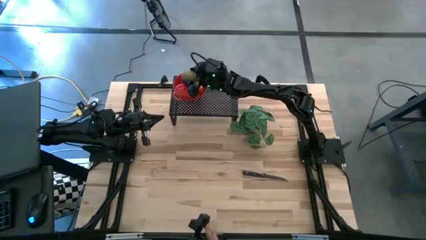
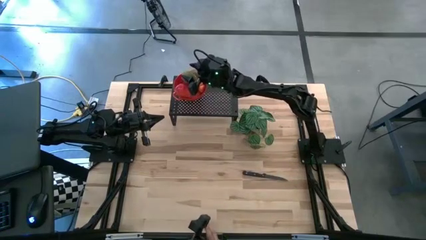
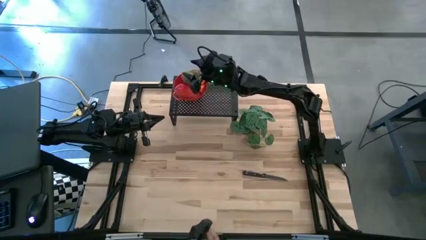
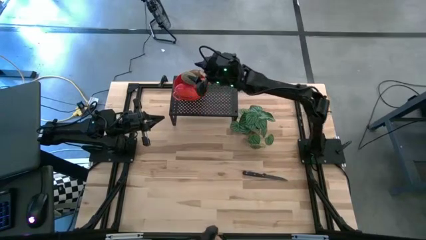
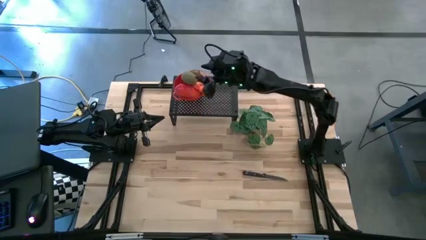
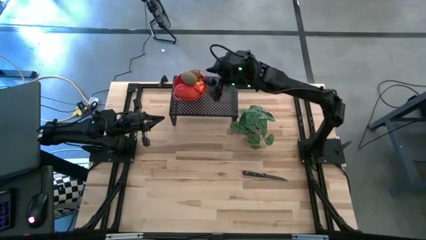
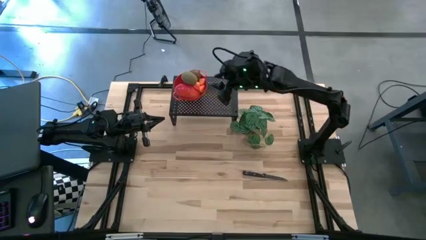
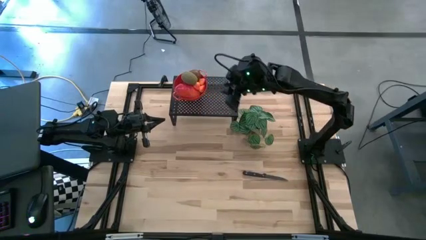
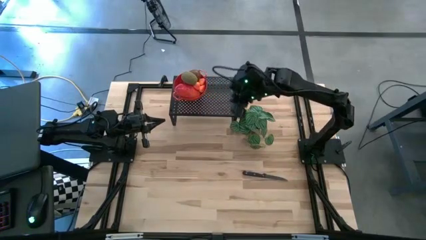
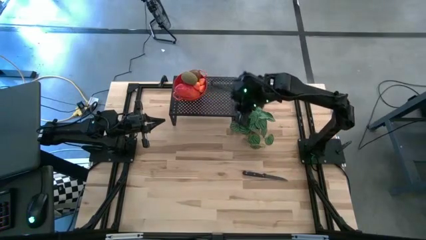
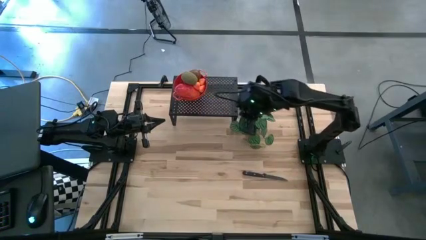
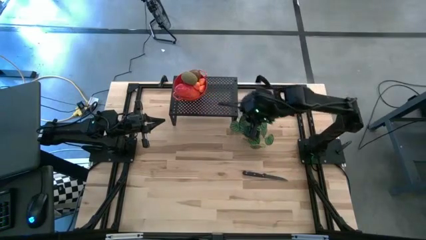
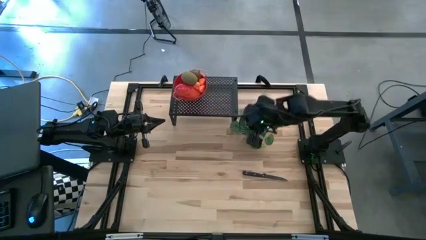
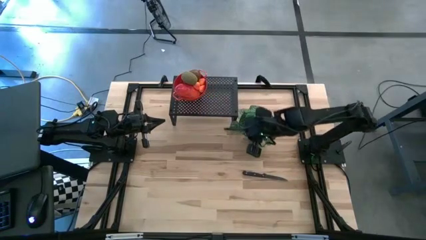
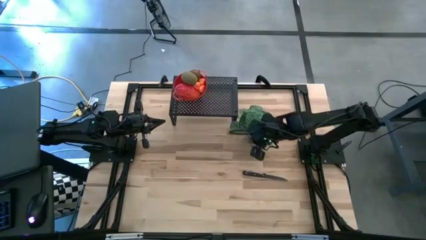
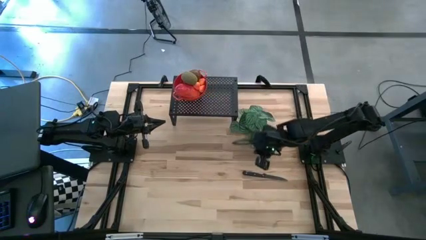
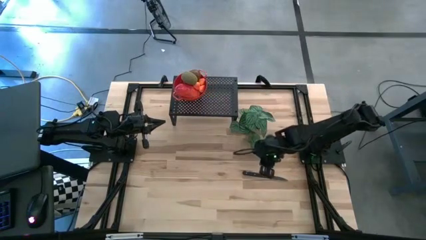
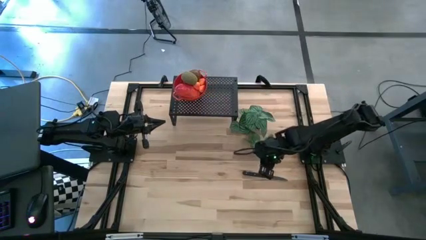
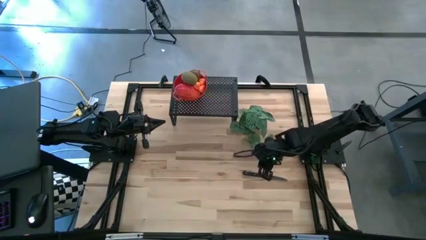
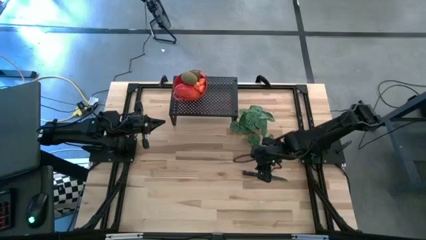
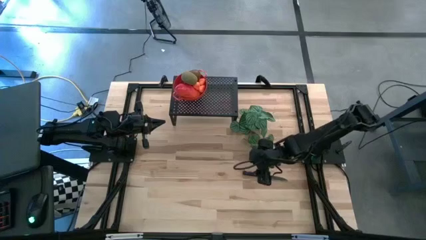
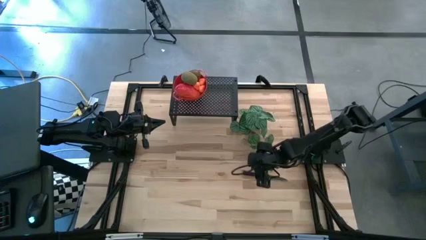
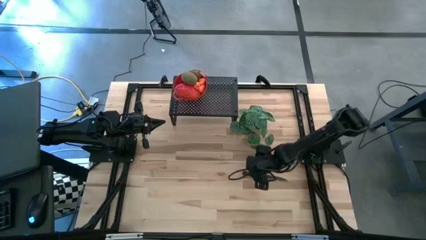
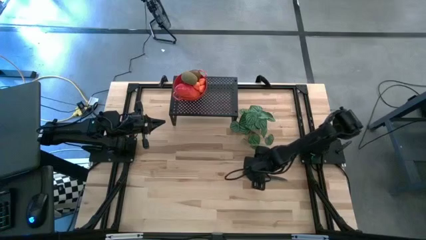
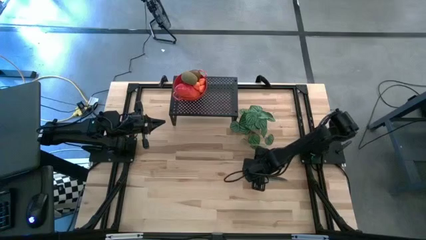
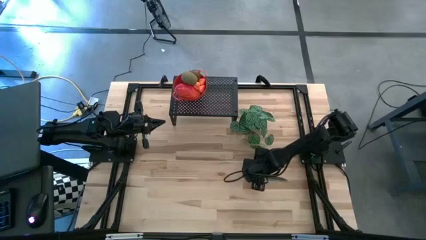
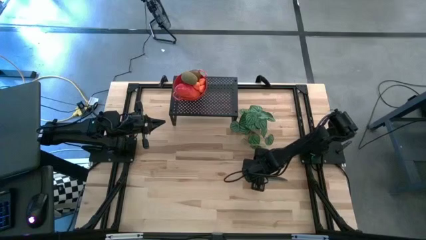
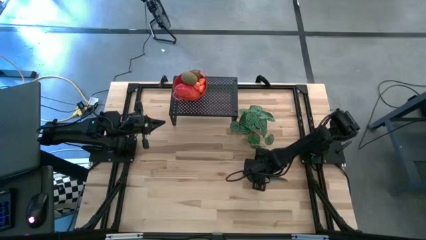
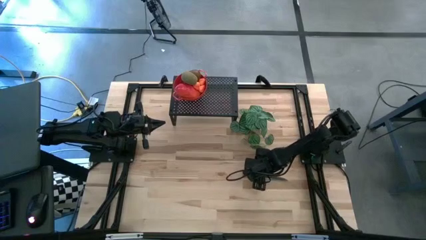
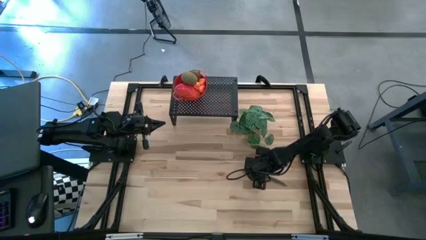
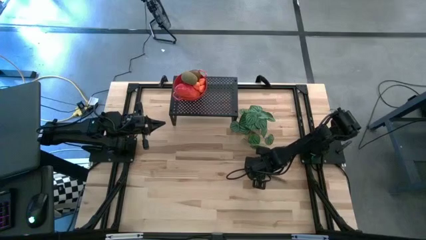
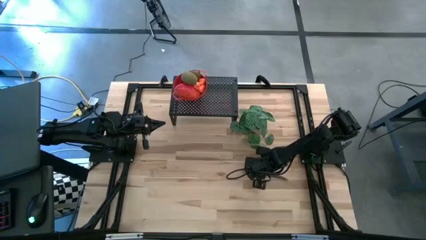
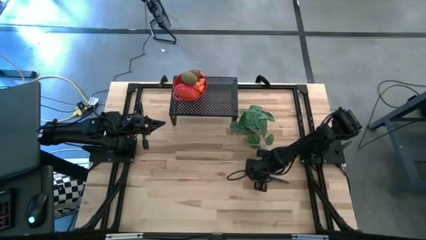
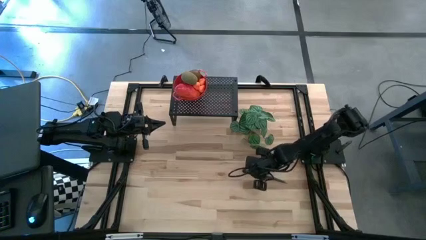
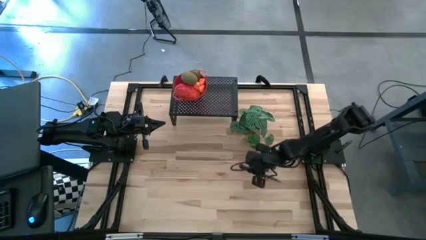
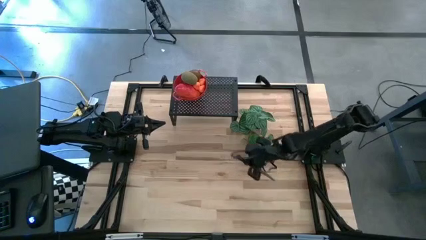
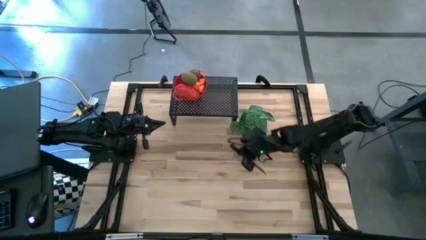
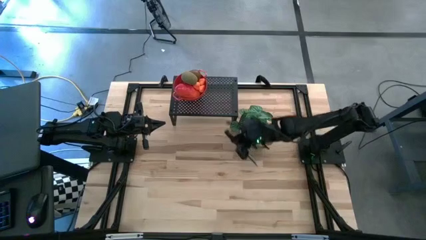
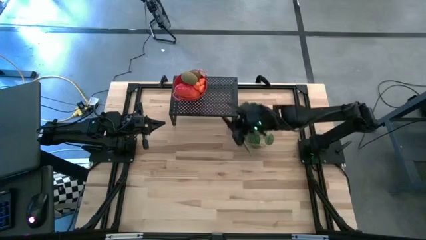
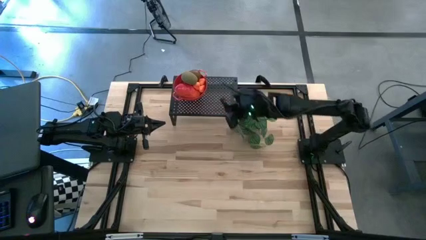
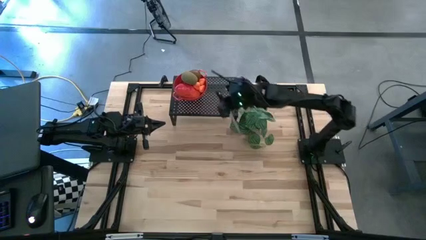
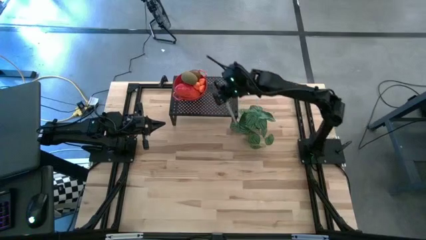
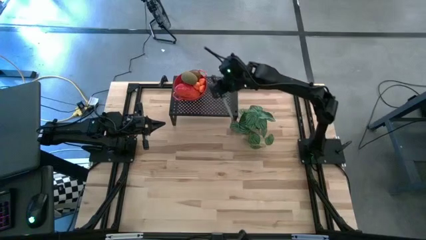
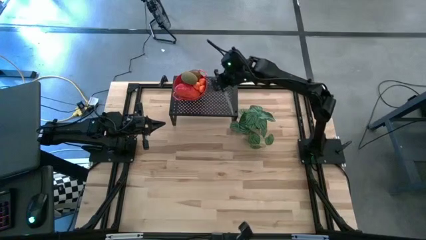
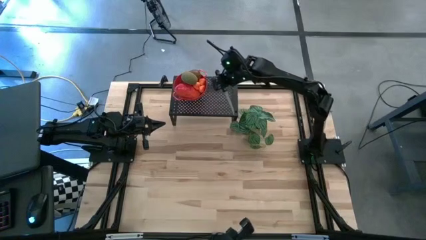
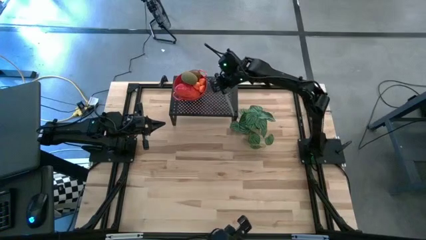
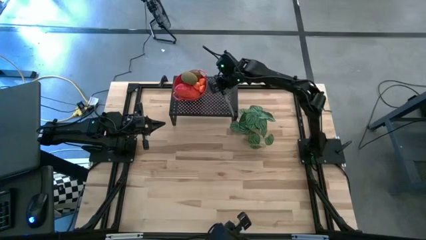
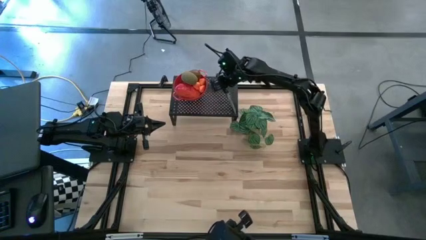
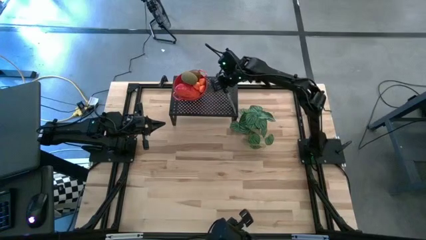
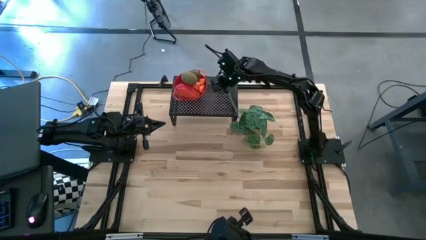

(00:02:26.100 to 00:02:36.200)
Task: Pick & Place Fruit
Put the black knife on the shelf

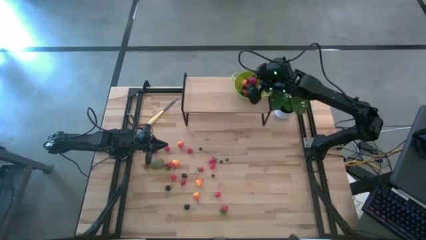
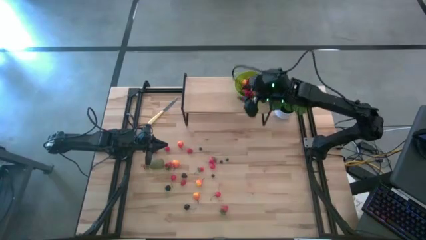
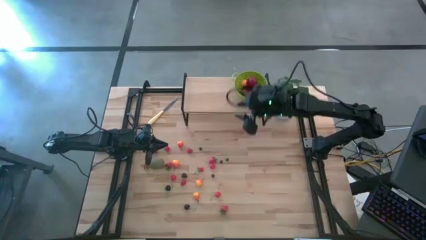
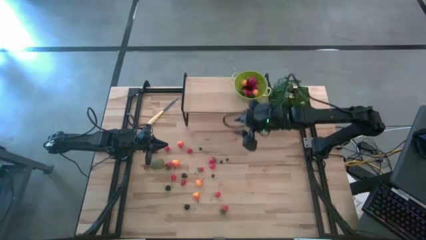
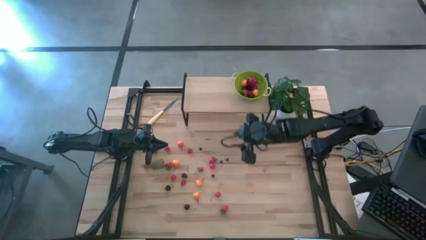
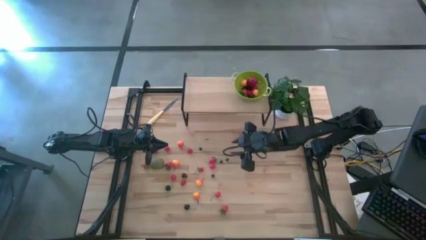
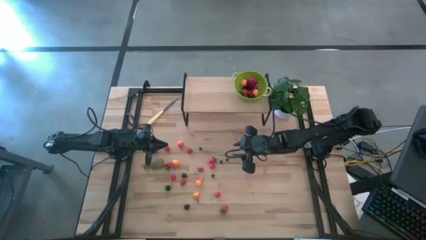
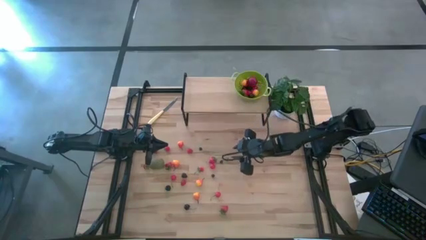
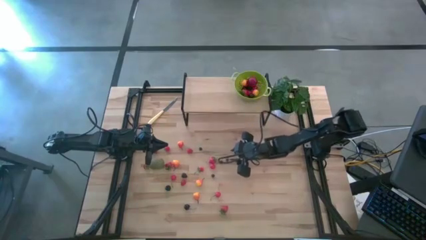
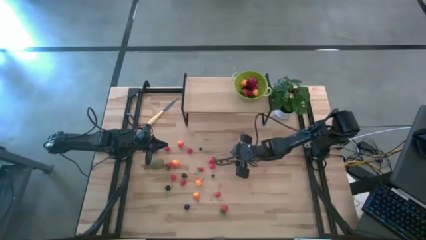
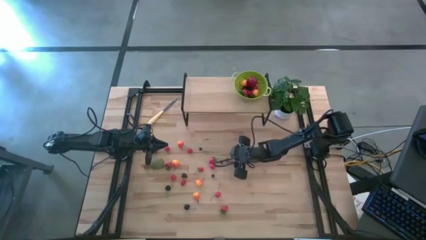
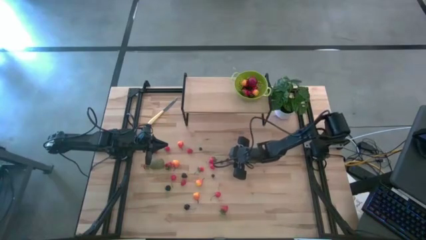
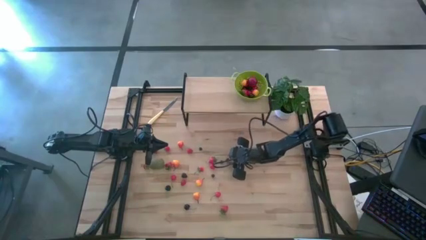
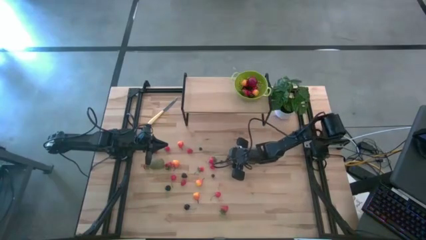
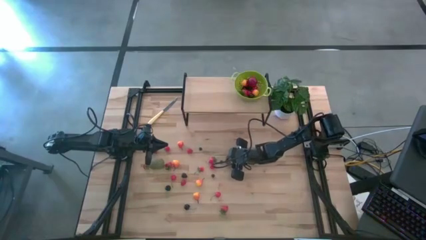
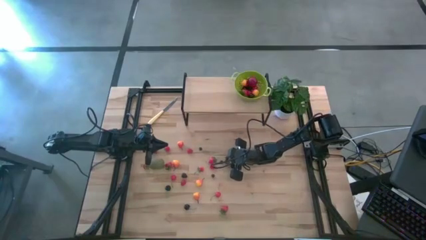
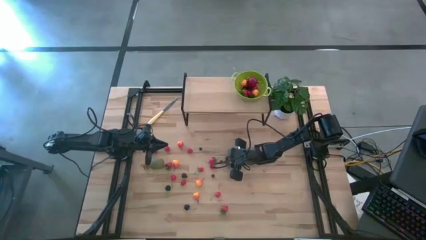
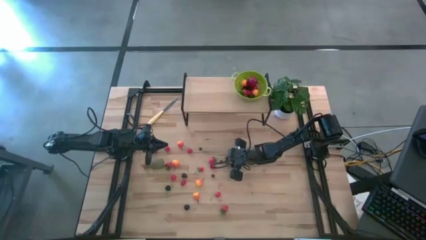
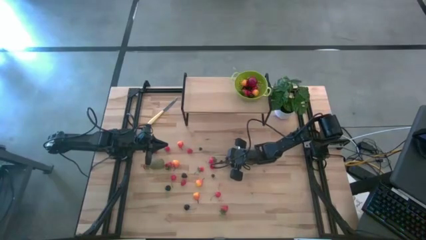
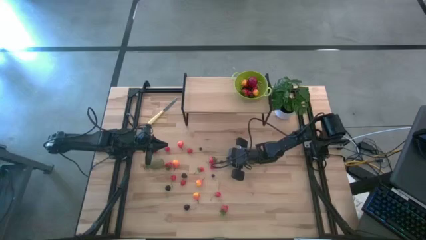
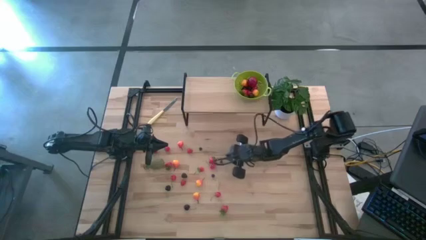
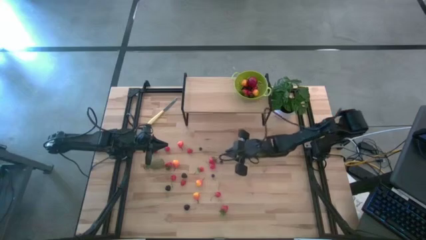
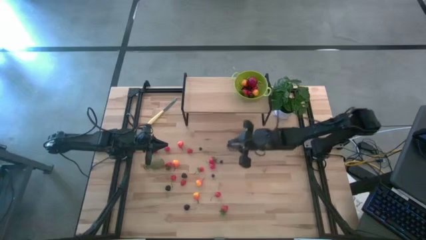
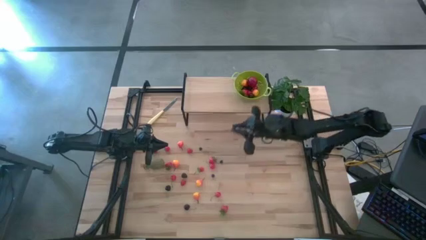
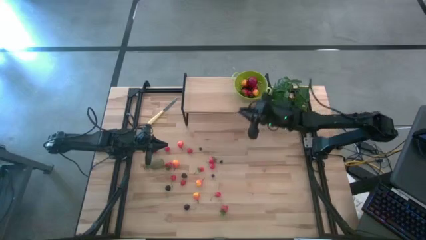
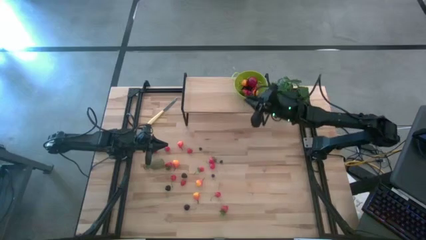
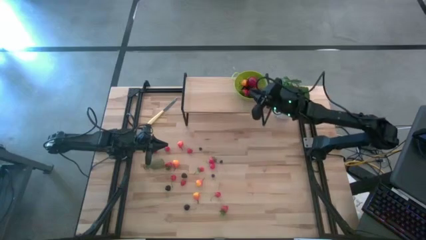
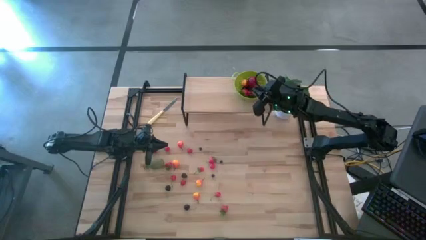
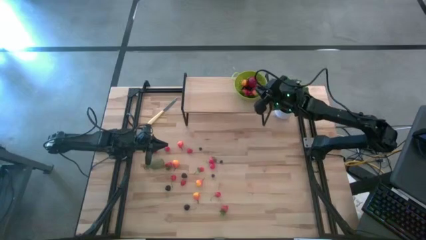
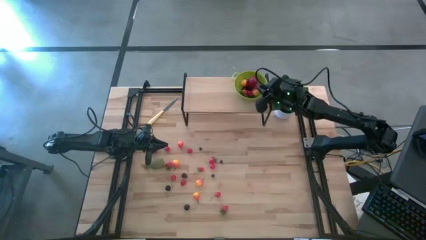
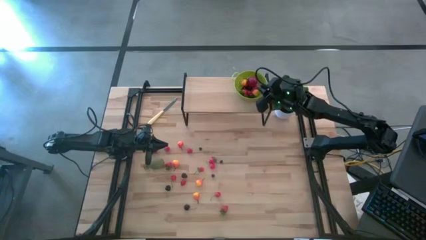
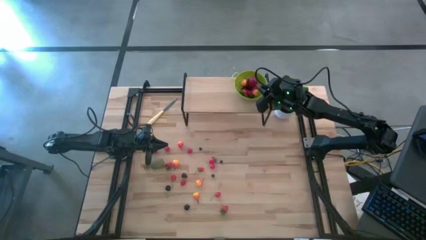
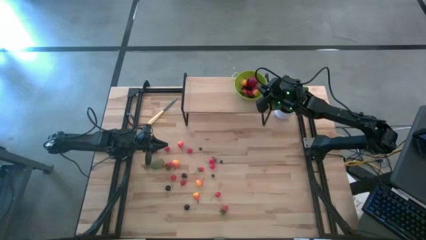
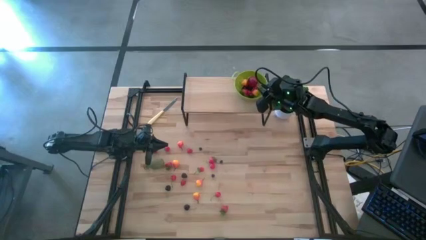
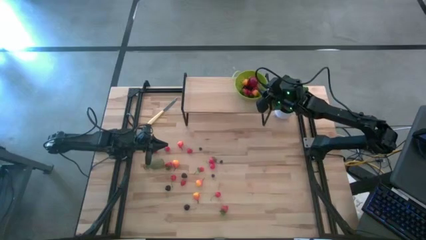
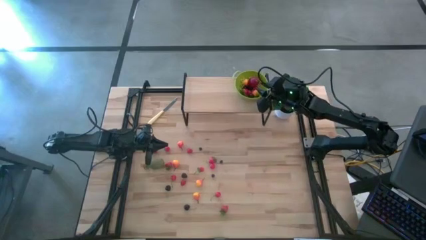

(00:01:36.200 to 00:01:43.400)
Task: Build produce basket
Put the blueberry into the green basket
